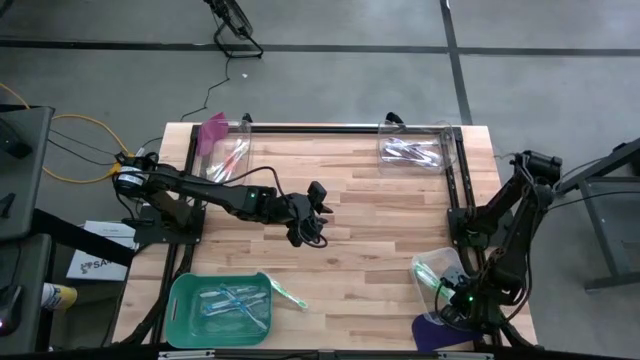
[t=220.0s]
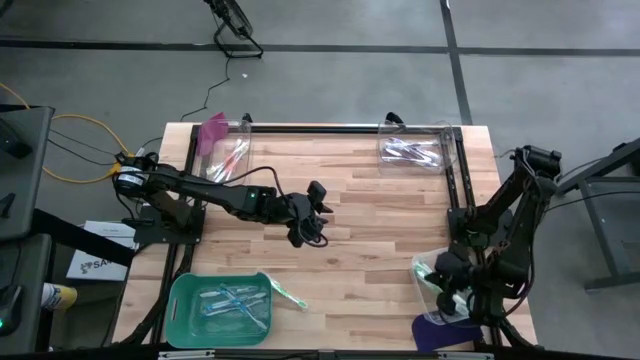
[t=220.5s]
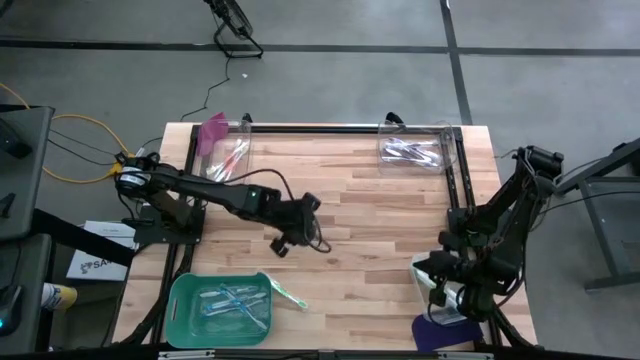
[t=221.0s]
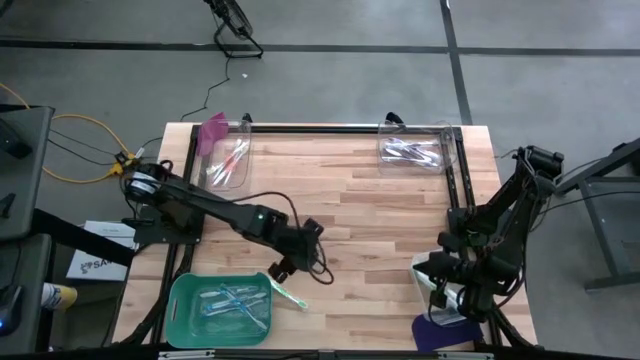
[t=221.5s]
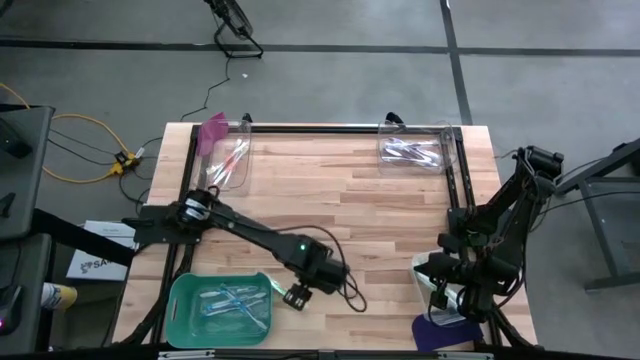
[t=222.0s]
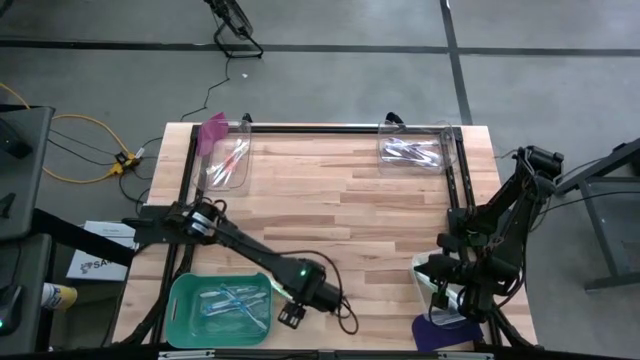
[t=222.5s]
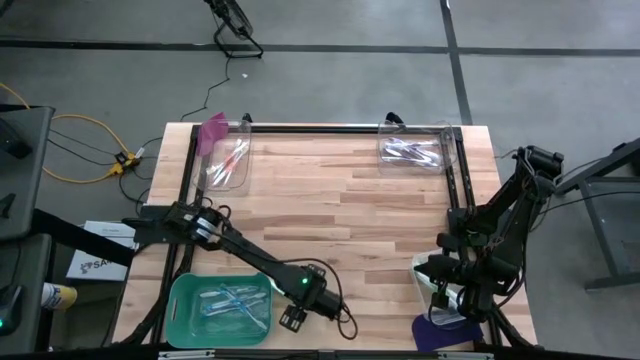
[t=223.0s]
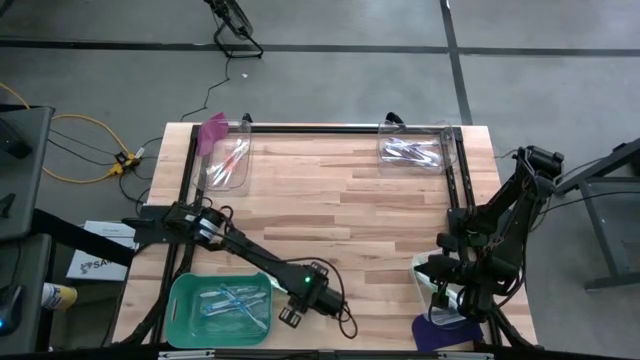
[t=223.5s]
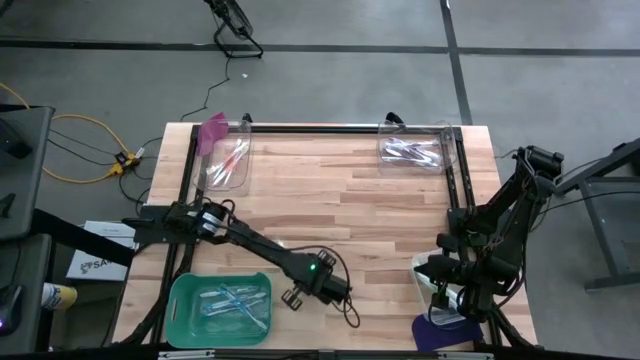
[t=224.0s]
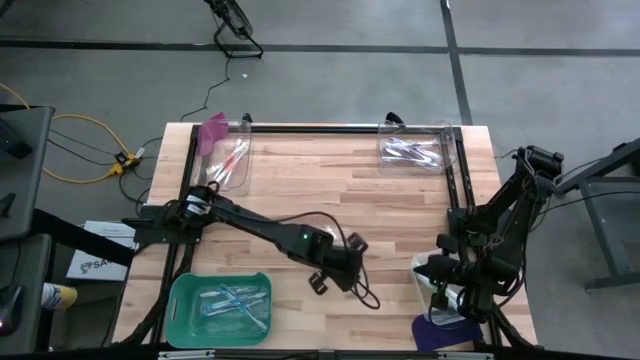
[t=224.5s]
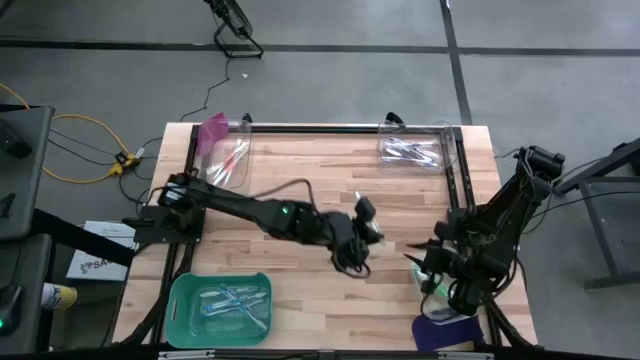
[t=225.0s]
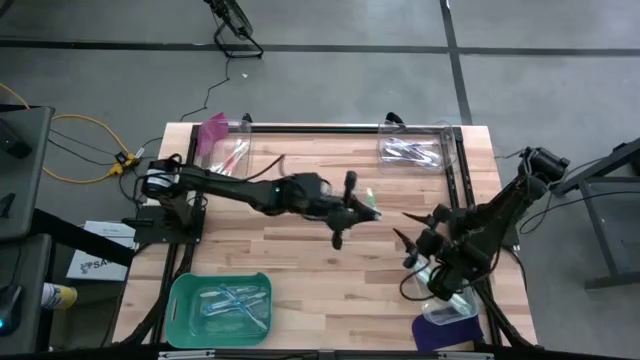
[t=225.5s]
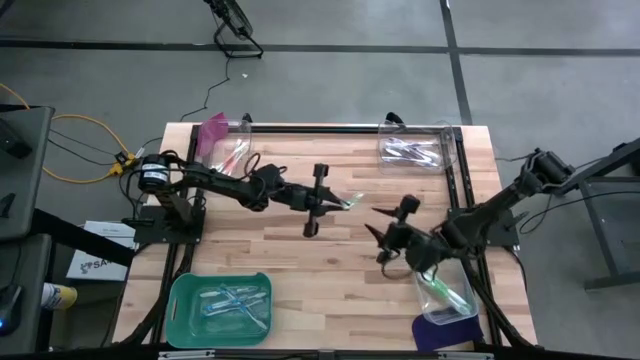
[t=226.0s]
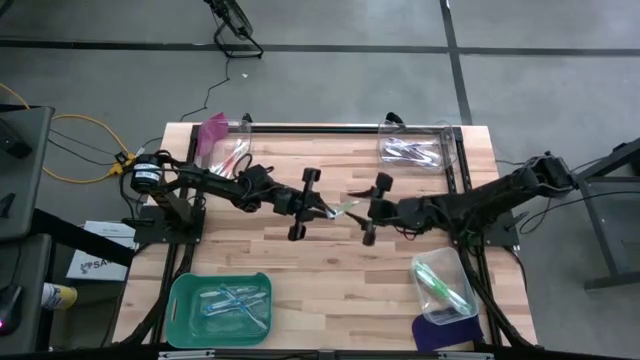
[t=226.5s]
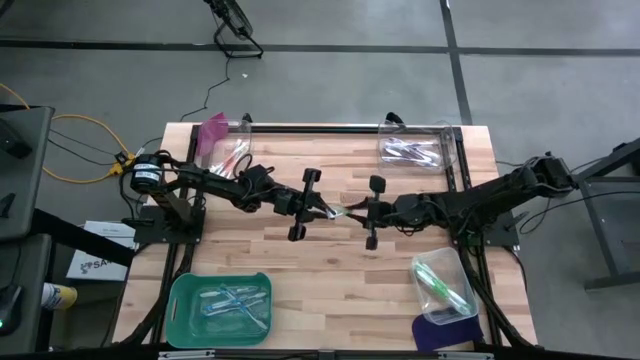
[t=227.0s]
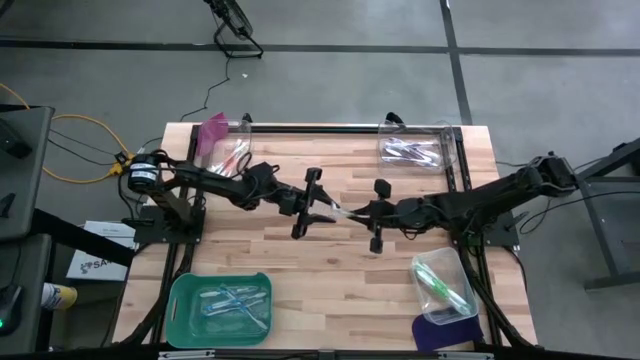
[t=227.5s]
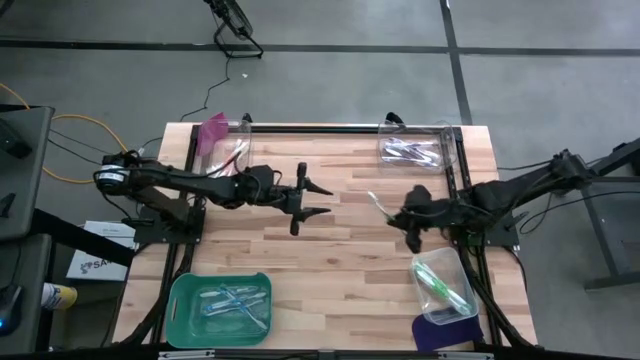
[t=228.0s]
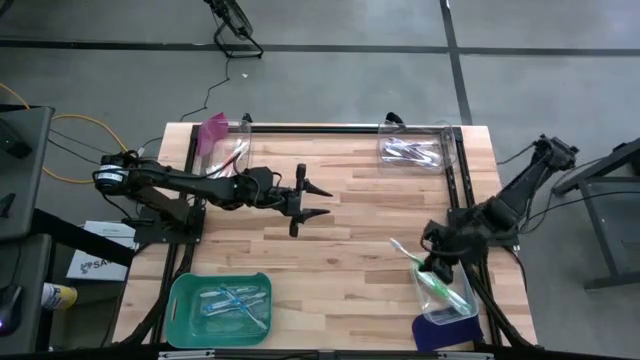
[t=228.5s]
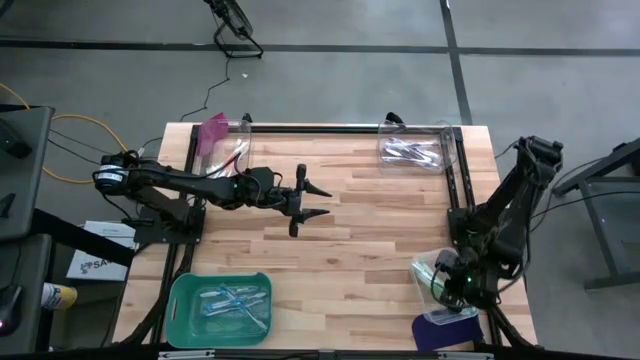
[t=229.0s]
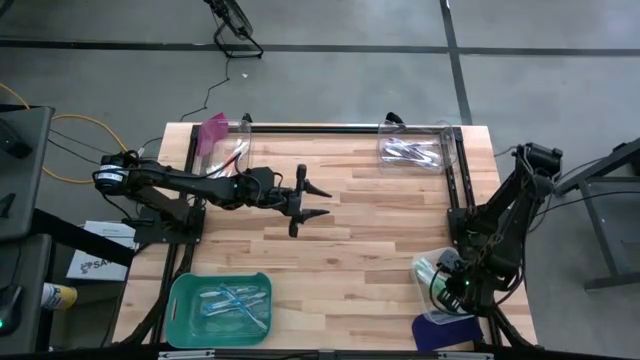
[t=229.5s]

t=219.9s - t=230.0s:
Task: Pick & Place Toothbrushes
Put the green toothbrush into the white bin

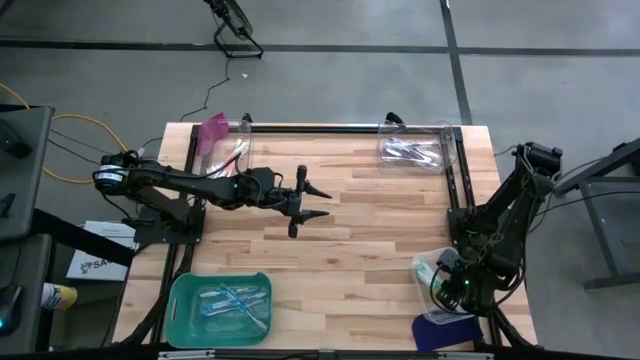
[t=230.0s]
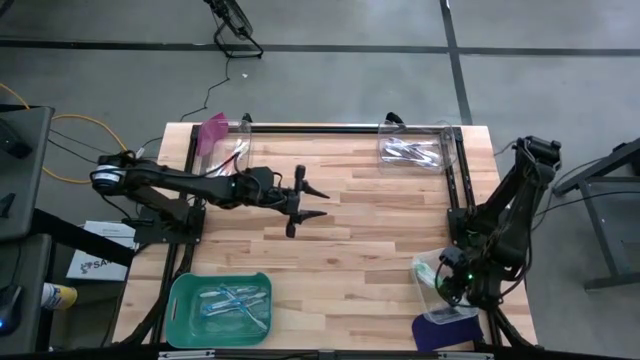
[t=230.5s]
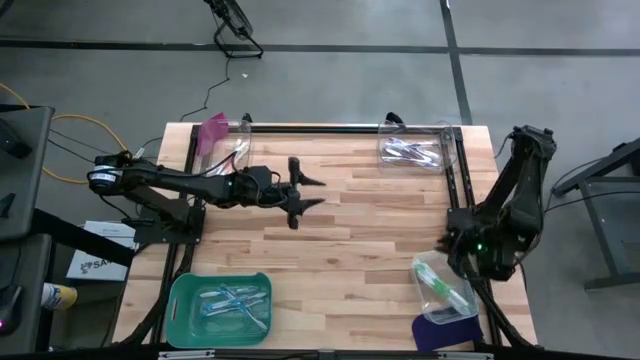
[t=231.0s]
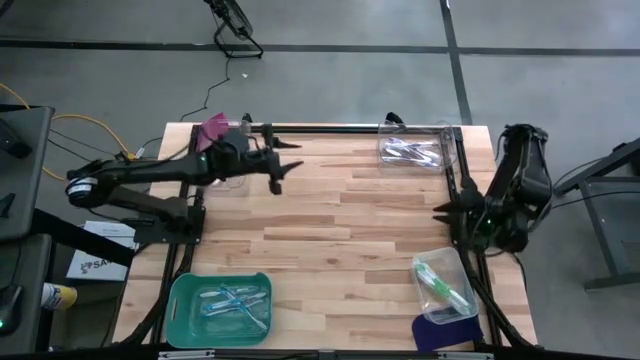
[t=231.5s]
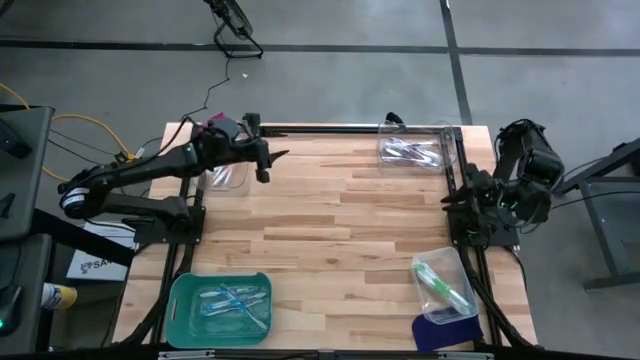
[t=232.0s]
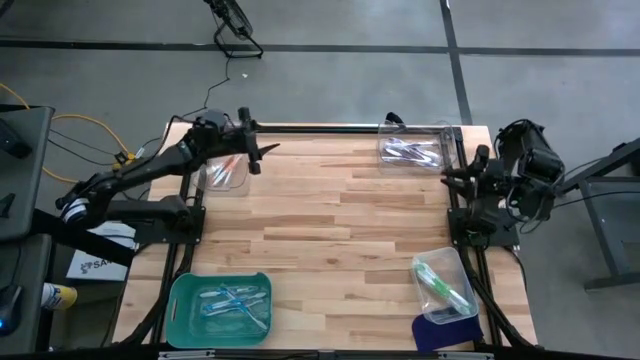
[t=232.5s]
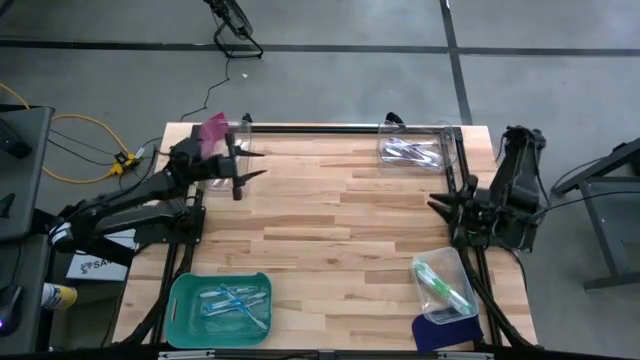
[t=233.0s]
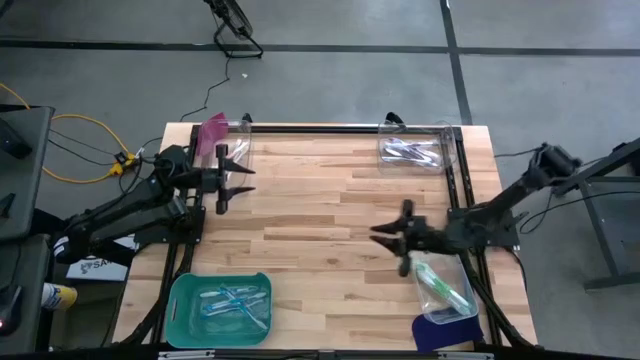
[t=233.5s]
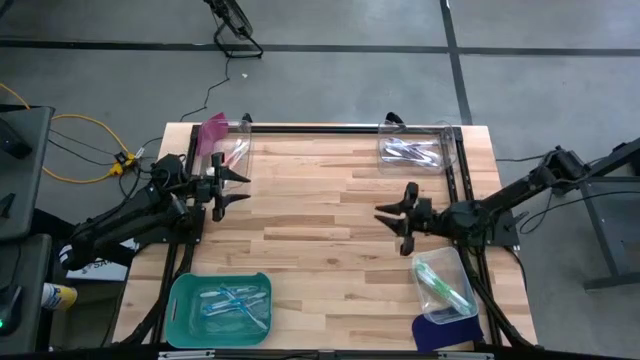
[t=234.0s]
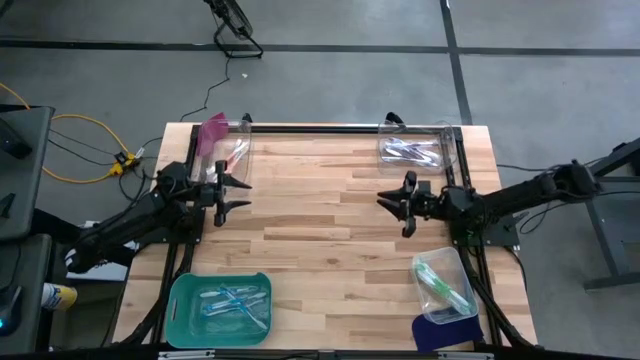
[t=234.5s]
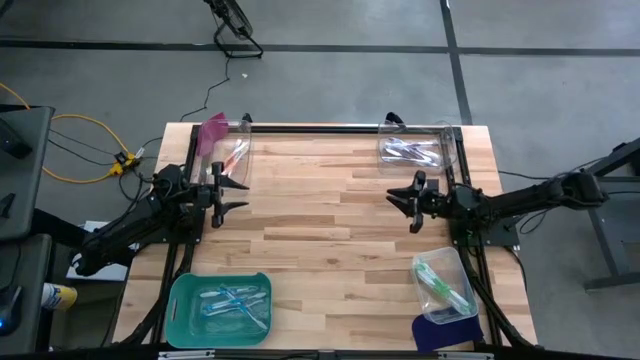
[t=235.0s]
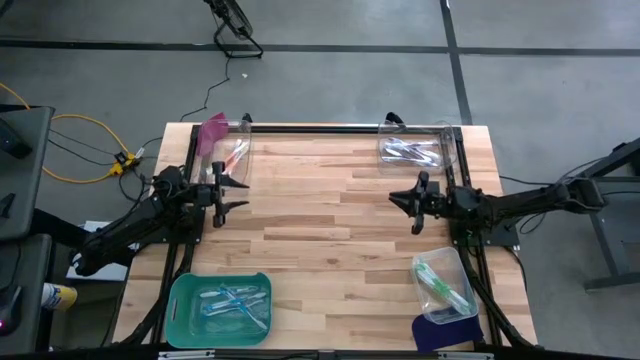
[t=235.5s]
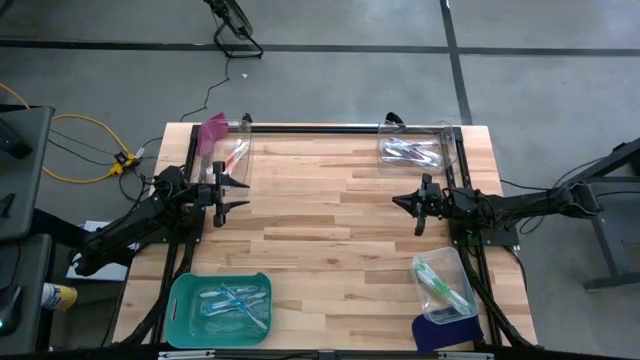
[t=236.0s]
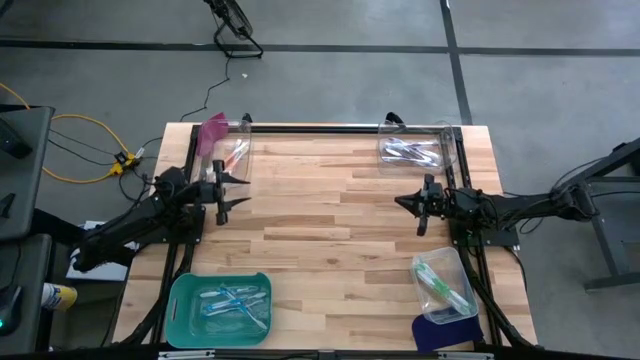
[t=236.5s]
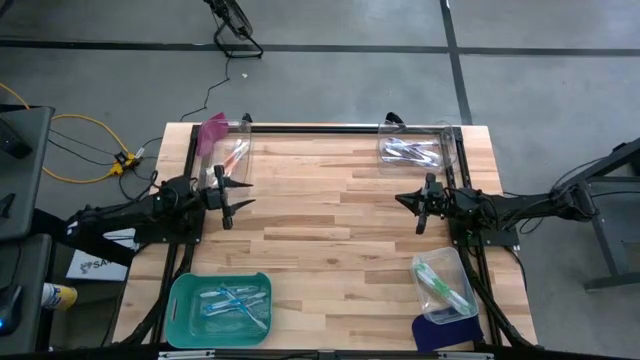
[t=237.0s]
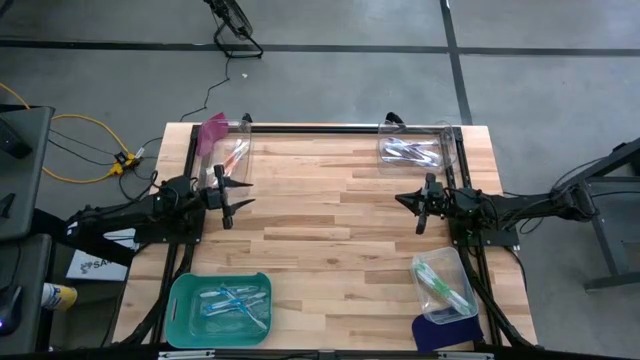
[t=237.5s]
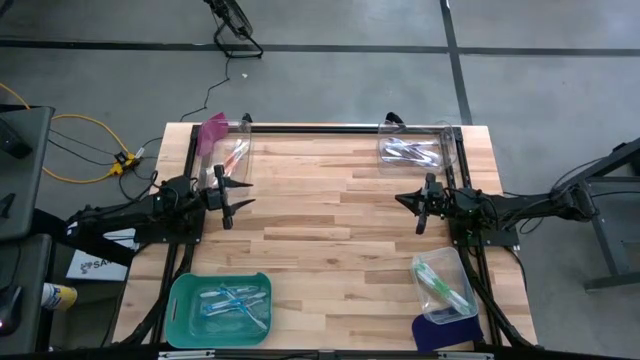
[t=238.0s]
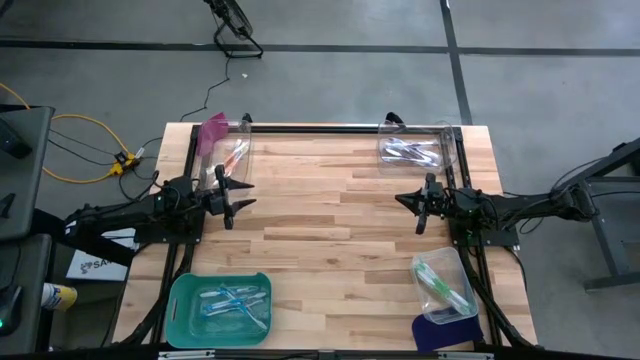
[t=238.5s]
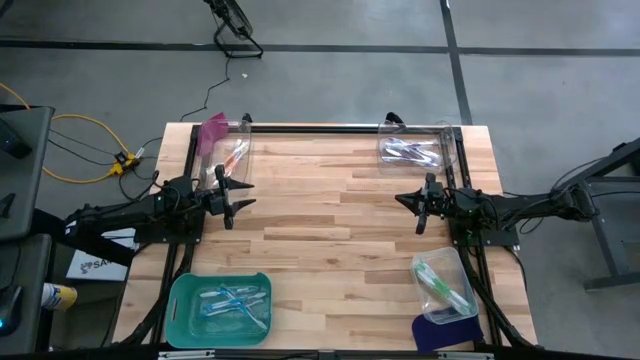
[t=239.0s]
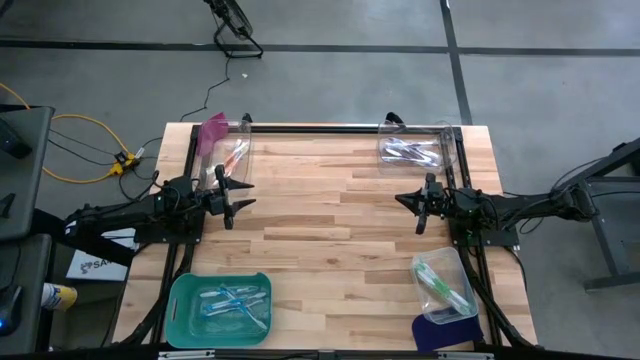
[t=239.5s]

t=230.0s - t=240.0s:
Return to Home Position
